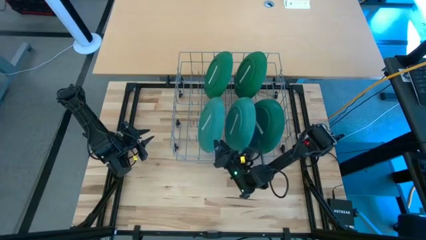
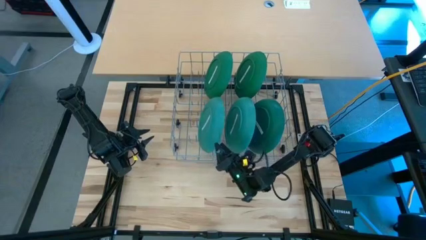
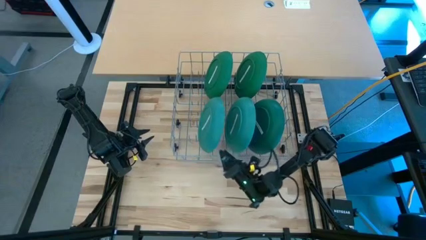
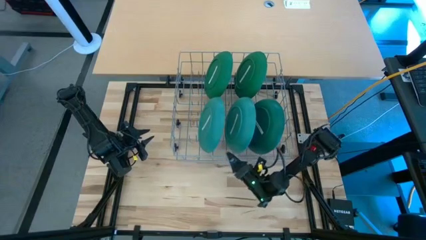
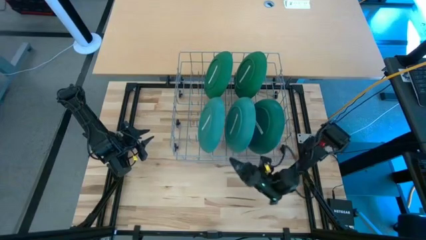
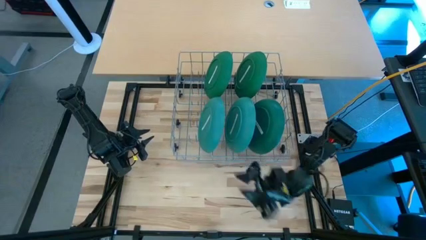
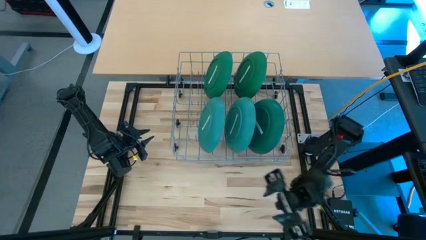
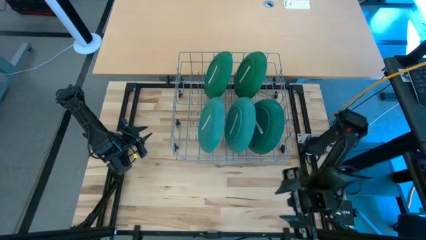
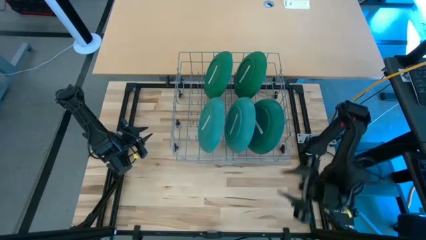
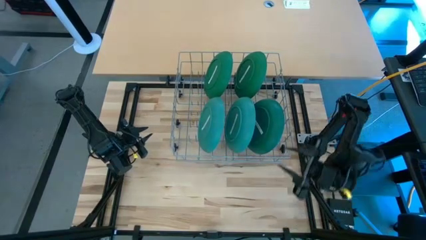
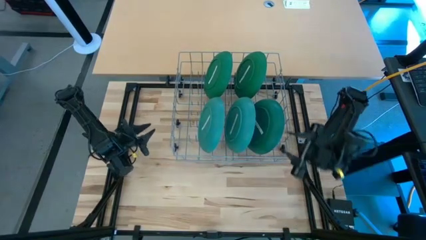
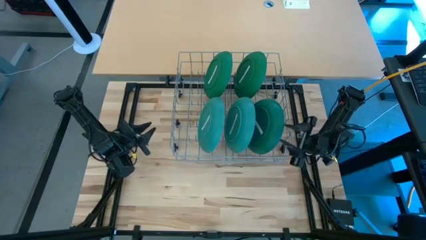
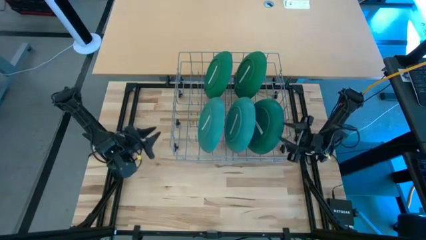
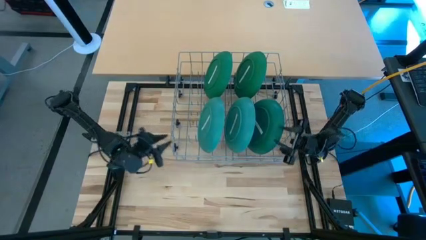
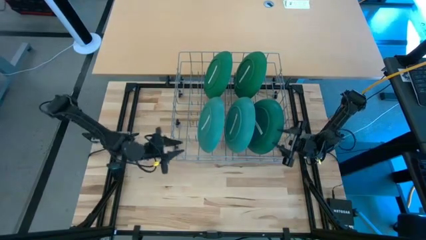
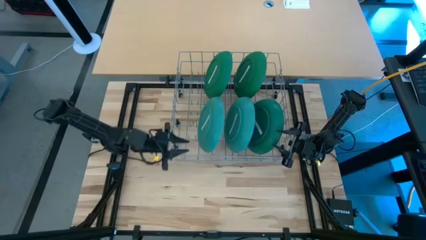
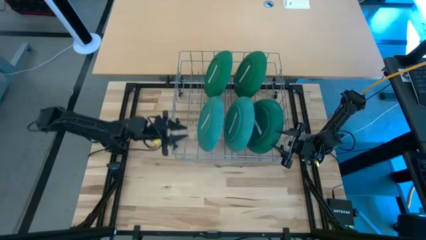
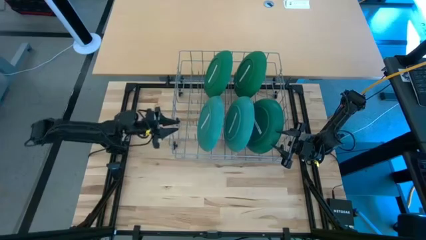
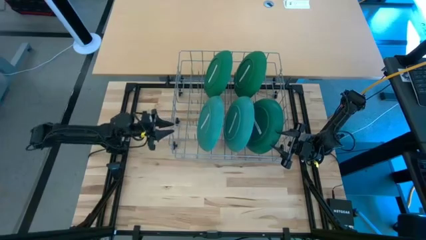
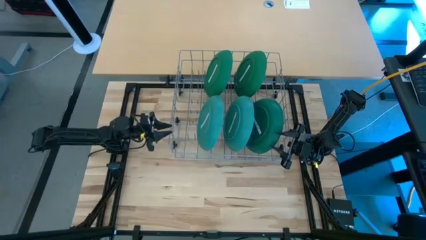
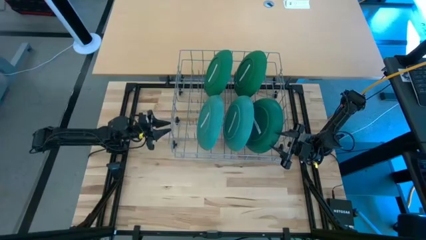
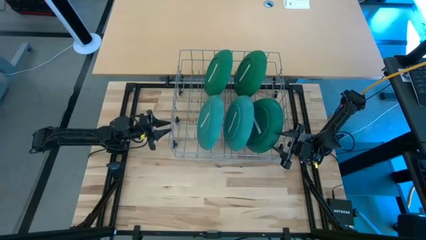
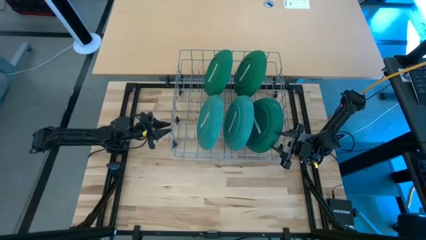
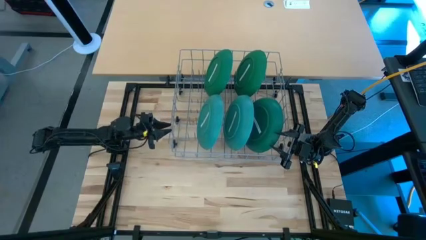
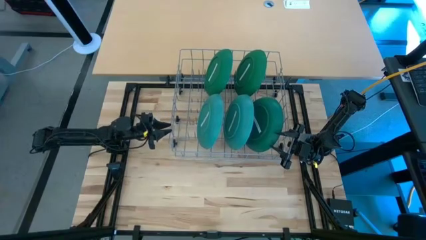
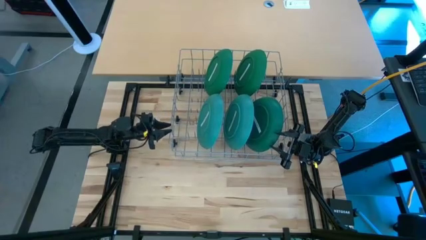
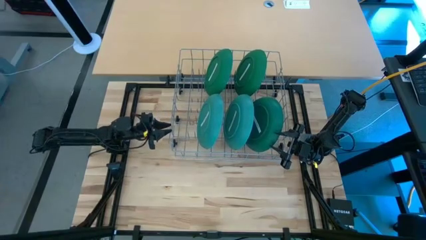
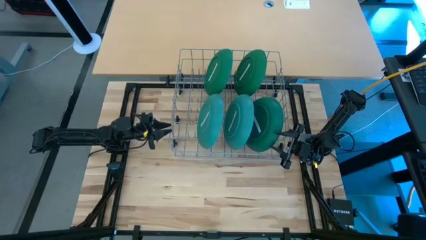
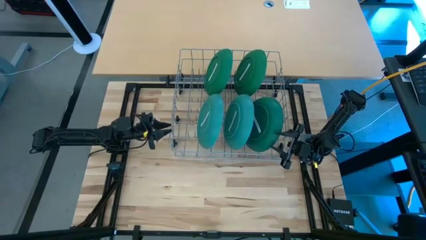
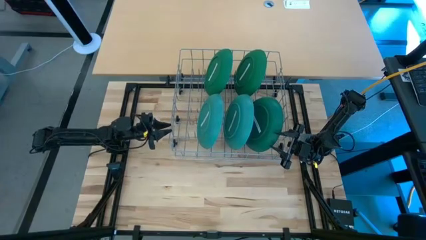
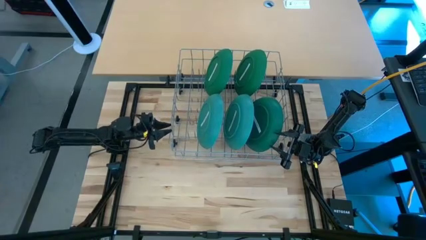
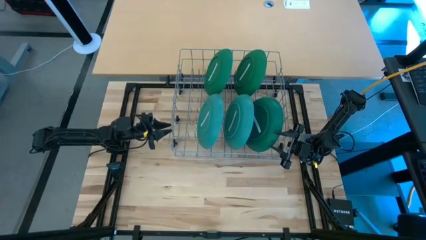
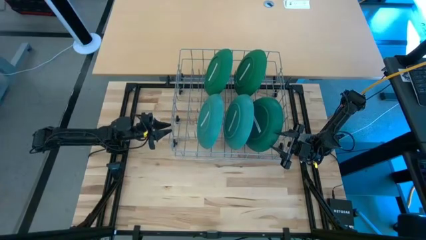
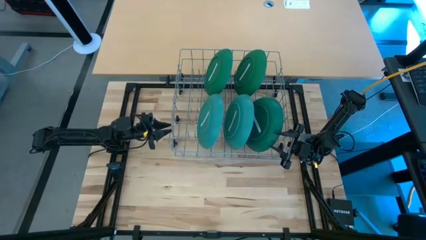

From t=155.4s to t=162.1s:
Task: Sort dishes
Return to Home Position

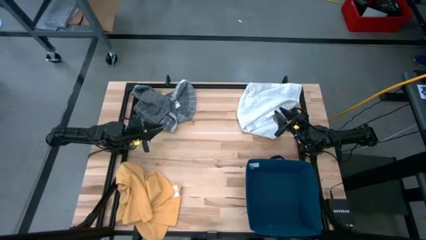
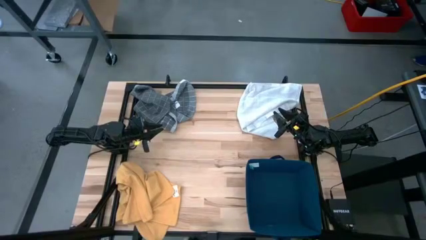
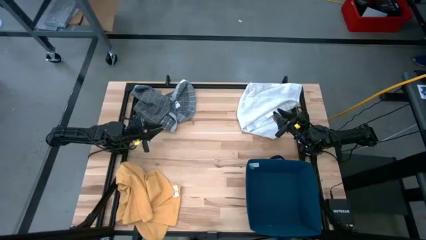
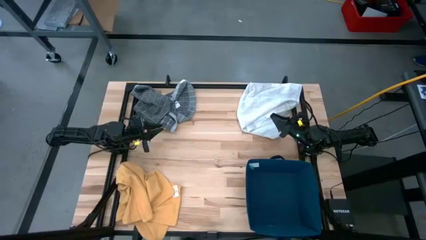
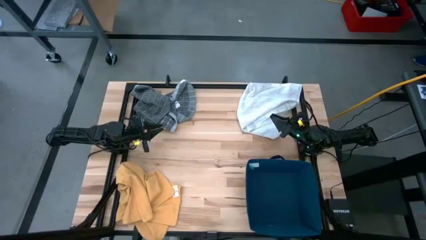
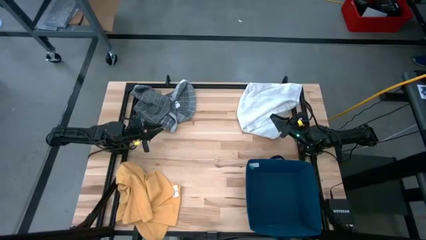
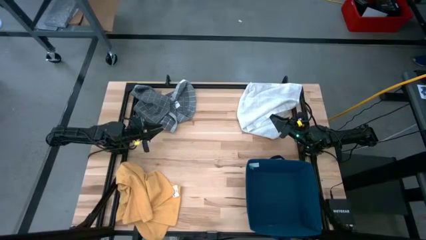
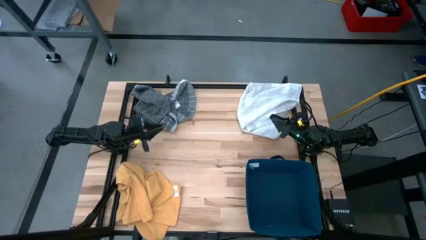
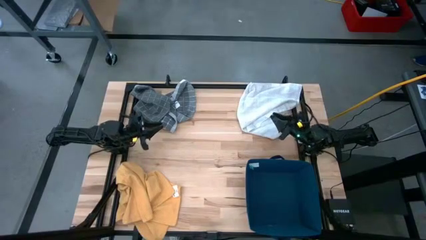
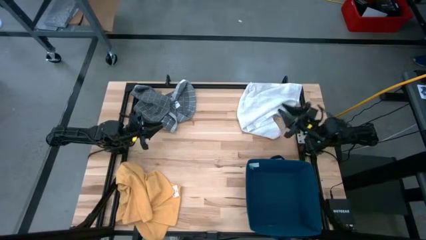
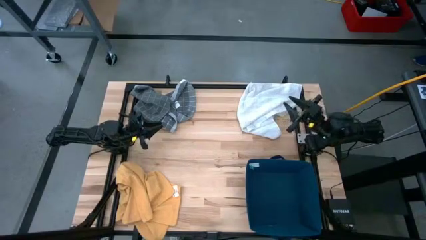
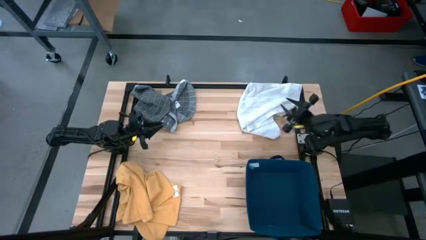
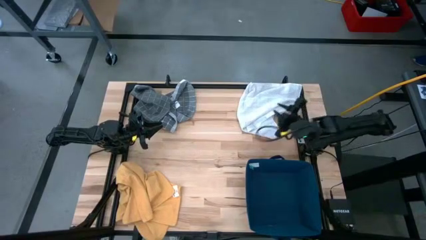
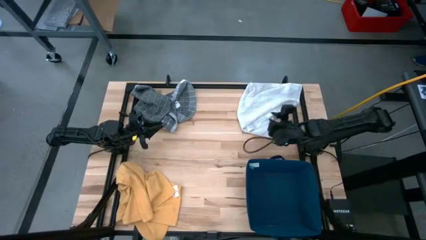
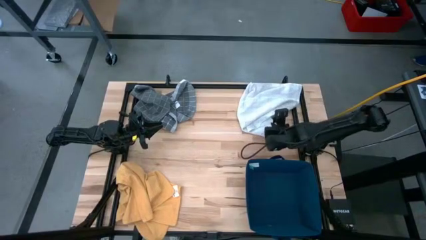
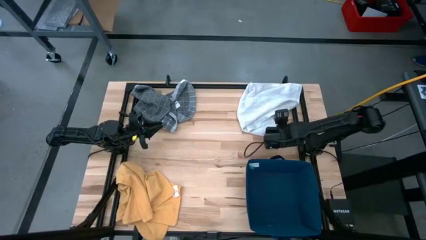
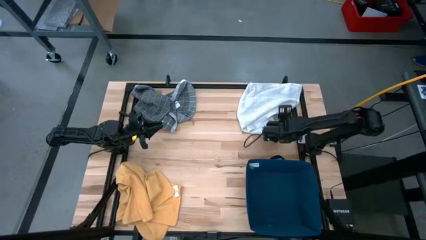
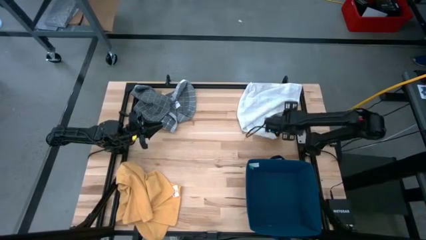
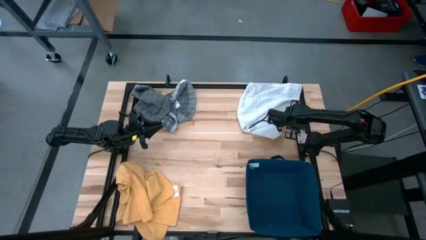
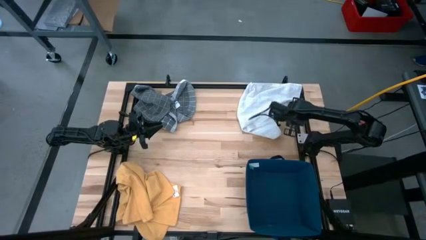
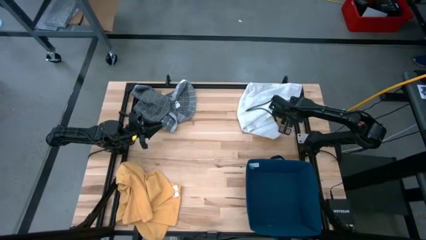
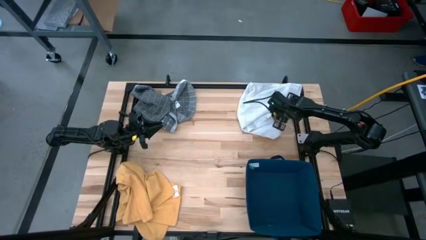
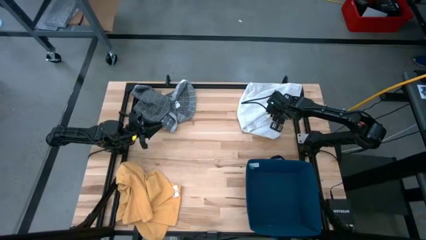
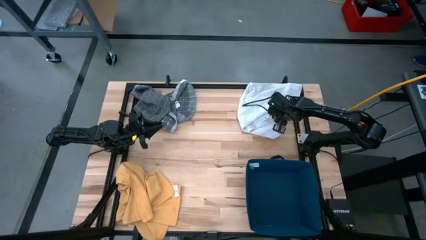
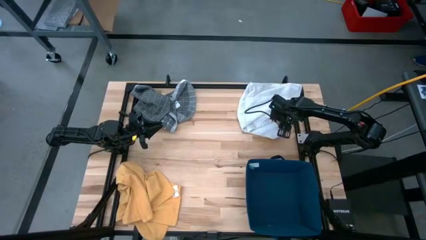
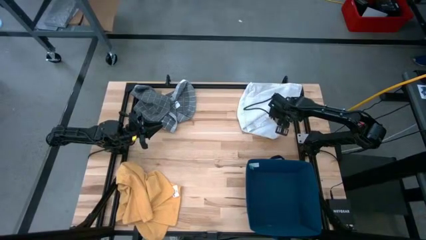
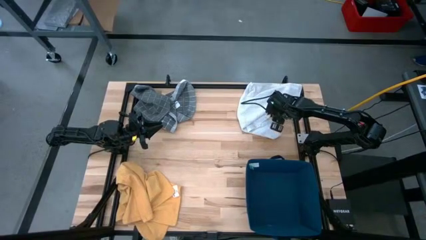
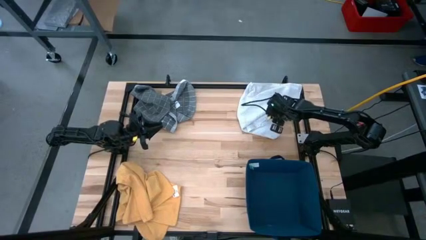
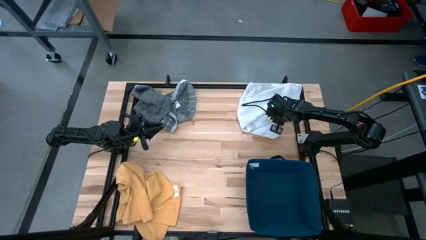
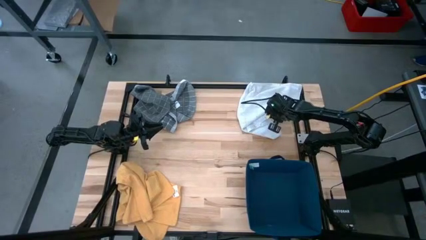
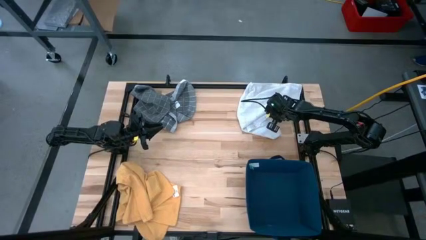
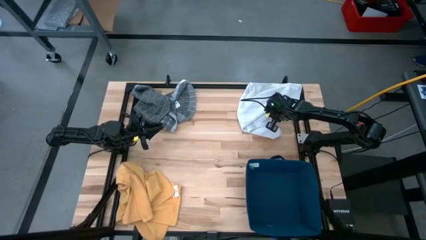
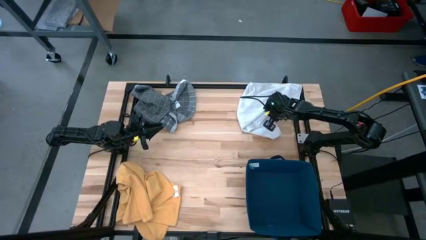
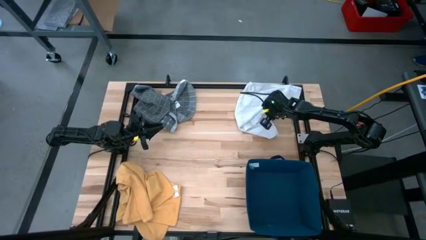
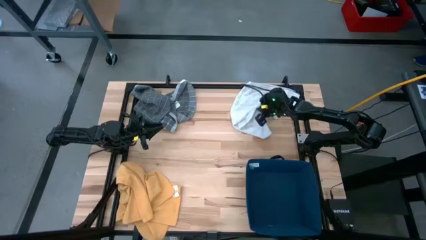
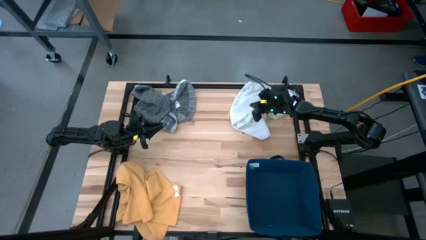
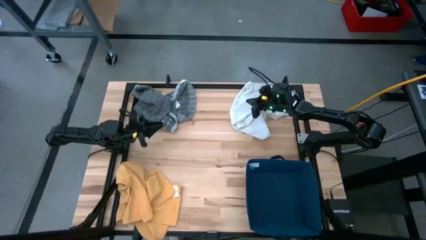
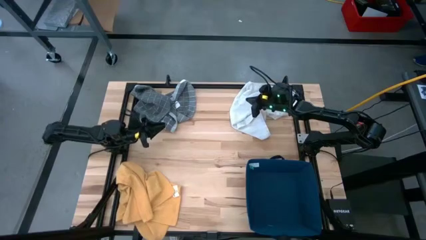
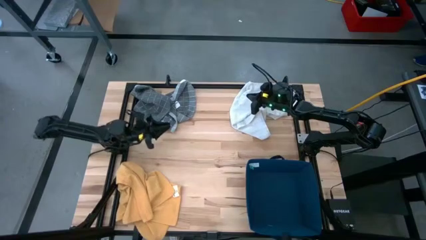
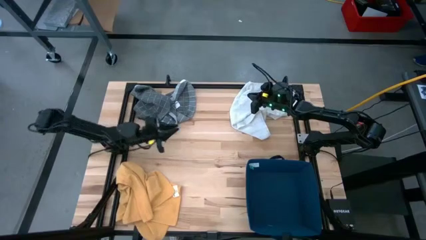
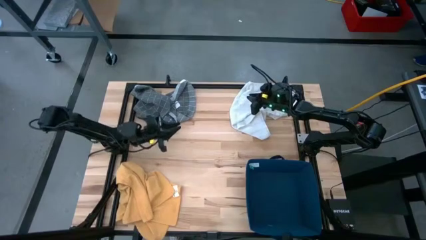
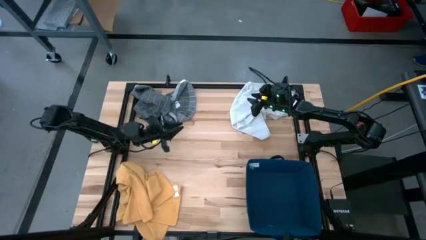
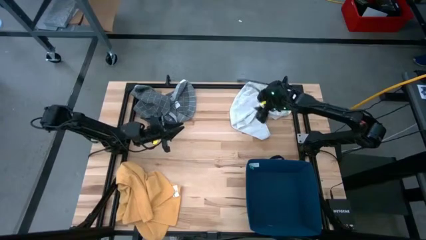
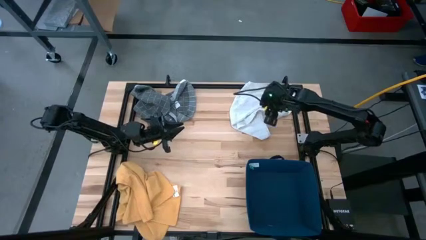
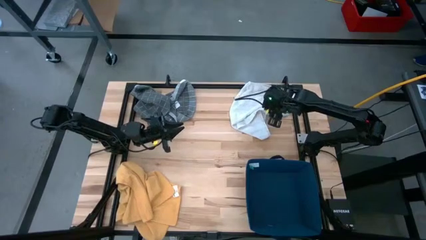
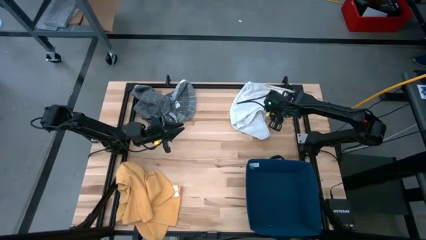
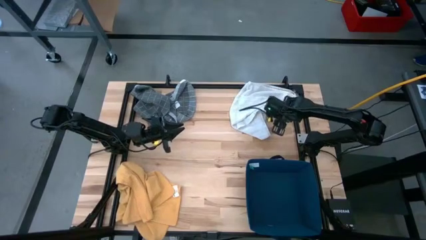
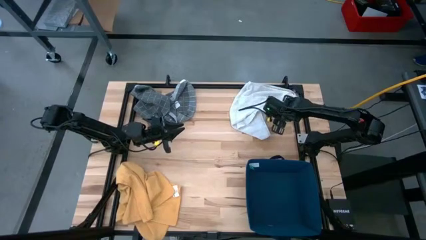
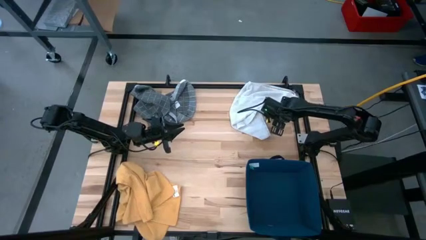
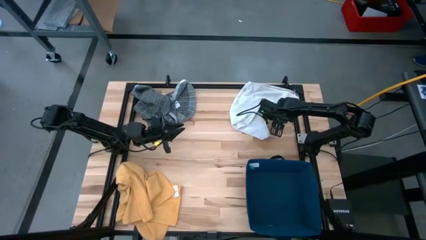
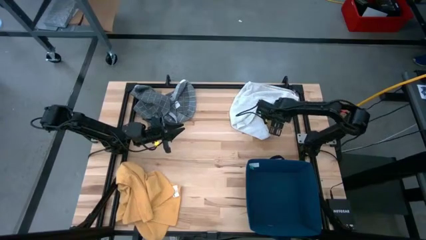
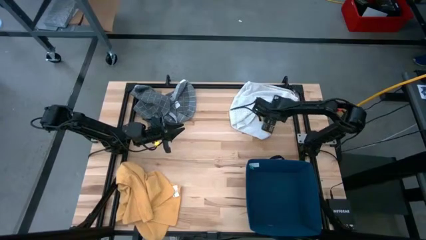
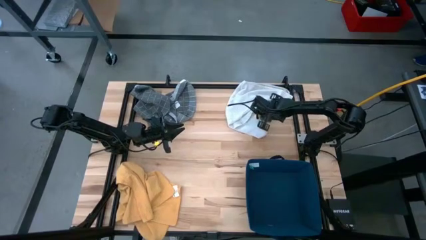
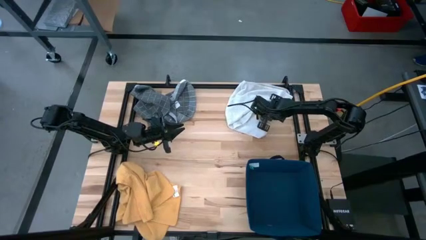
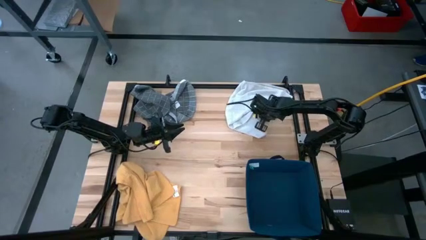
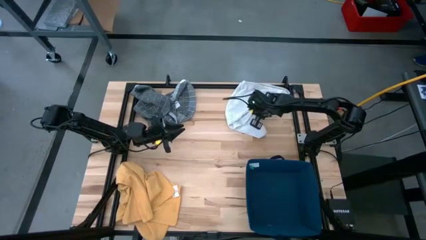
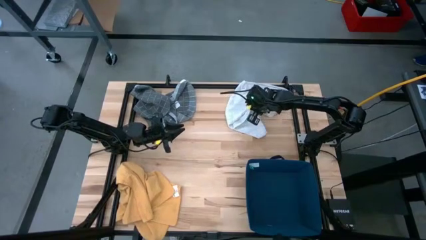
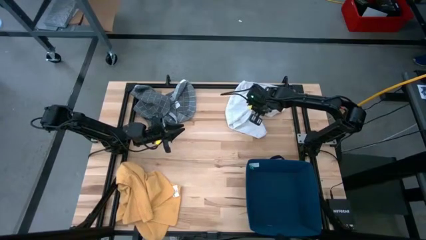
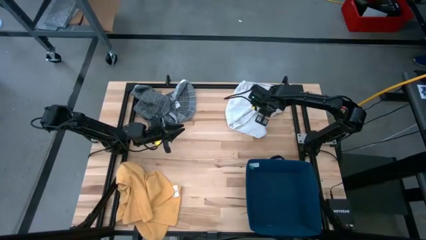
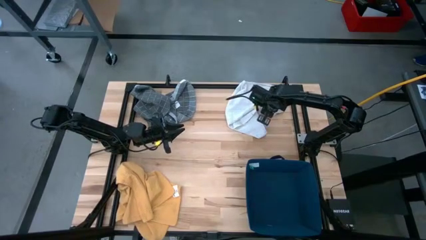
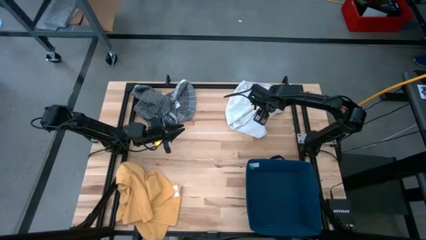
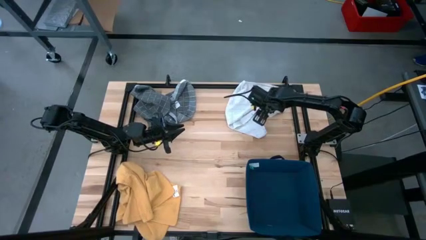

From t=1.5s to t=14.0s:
Task: Fold towel
Fold the white kitchen towel
